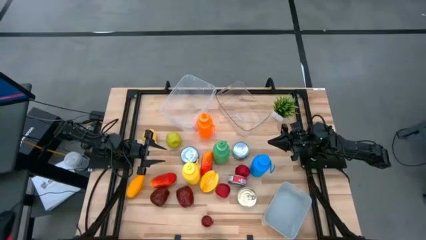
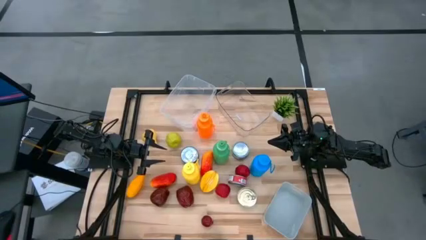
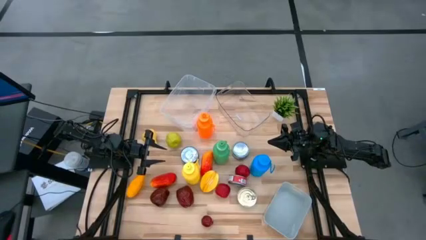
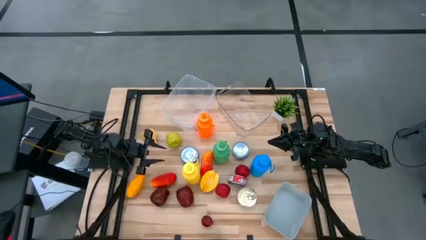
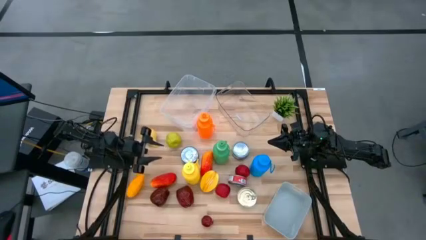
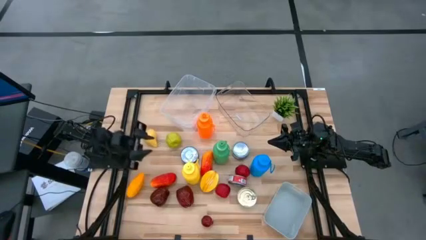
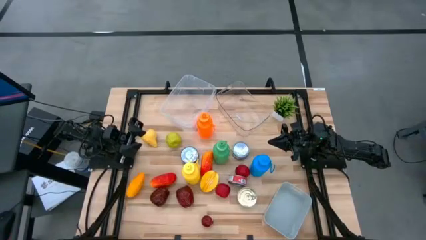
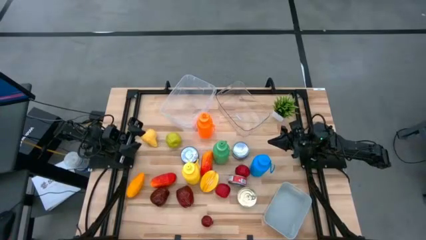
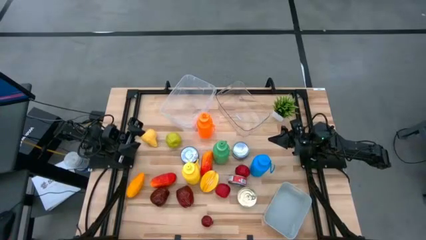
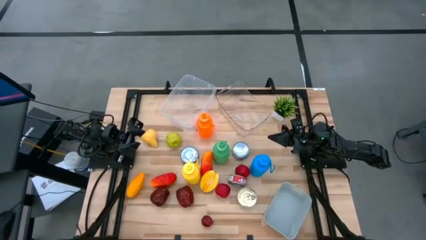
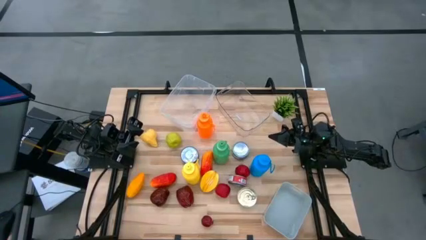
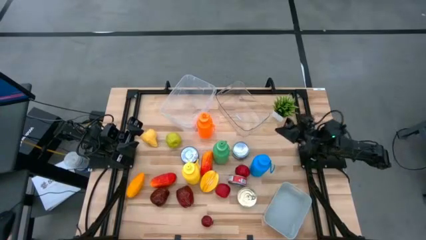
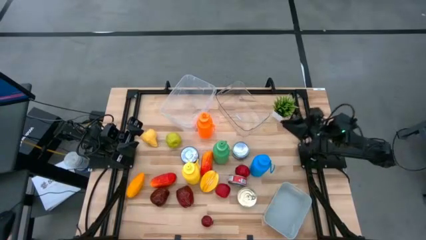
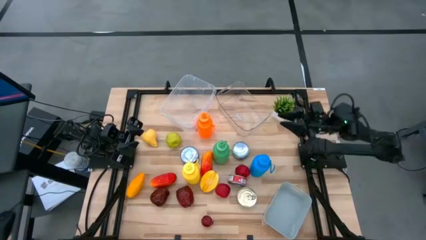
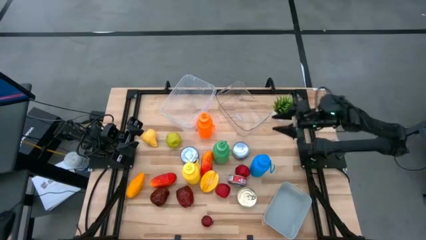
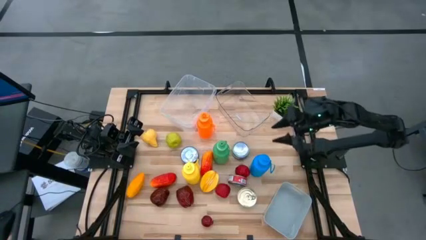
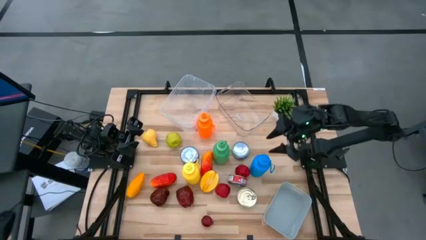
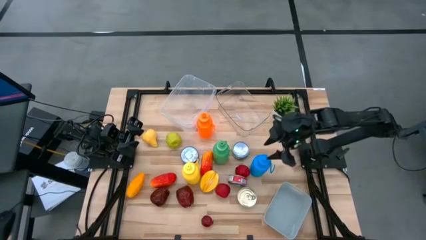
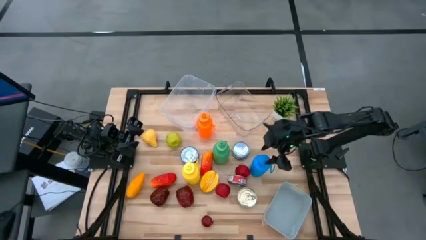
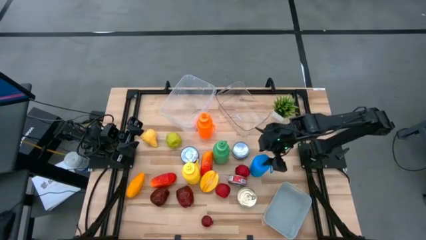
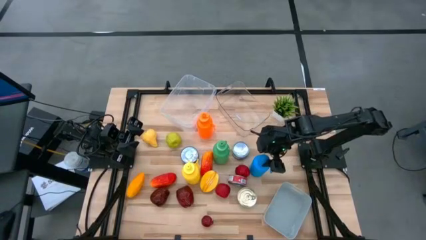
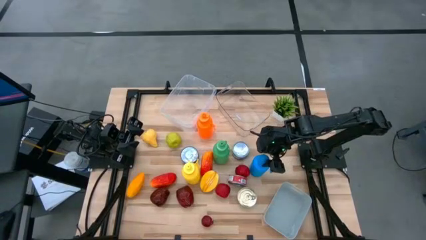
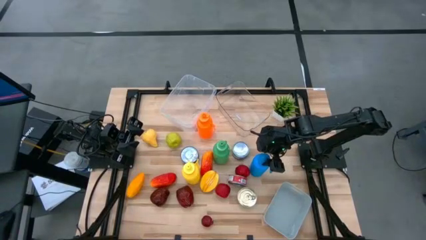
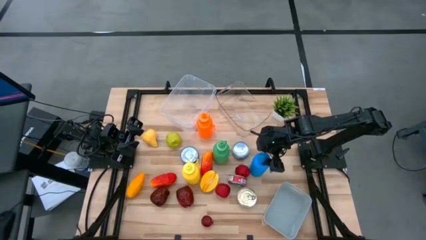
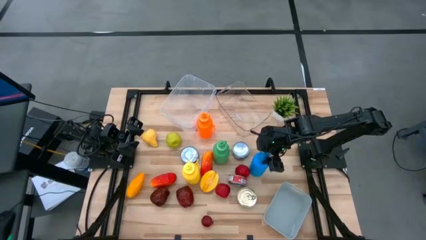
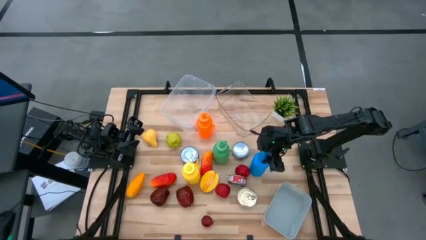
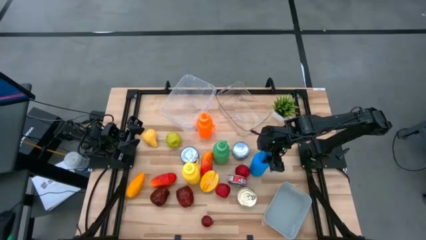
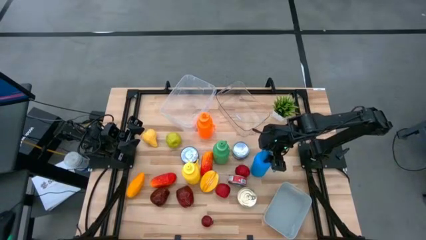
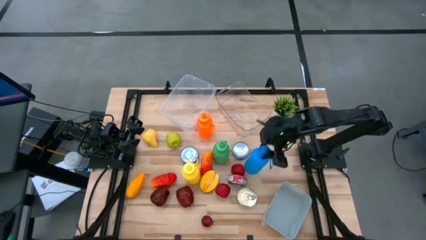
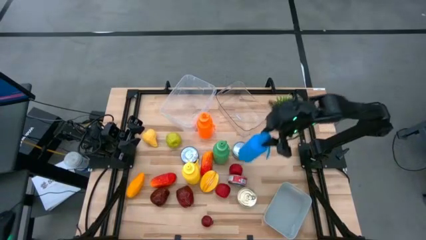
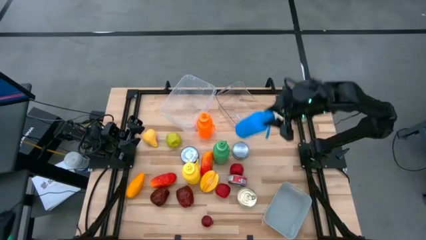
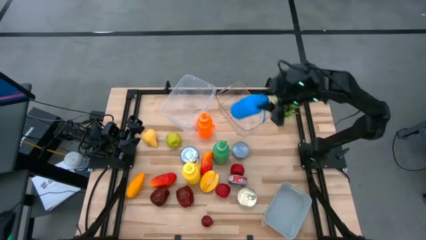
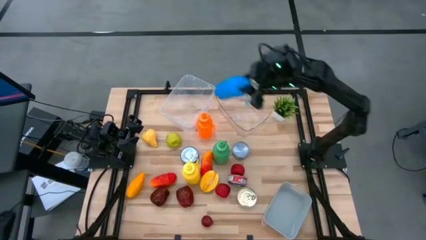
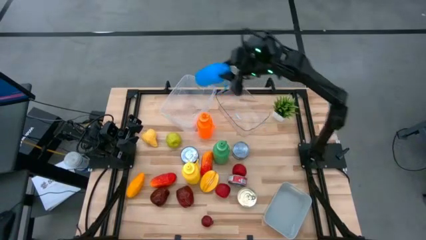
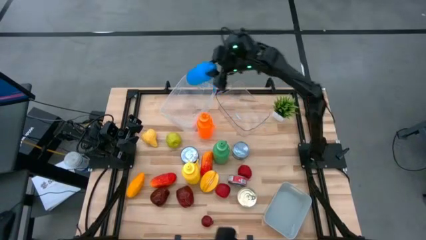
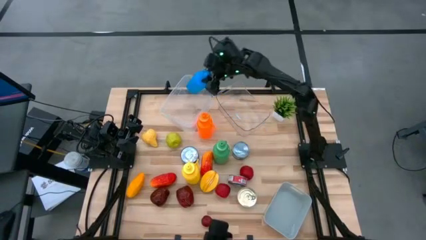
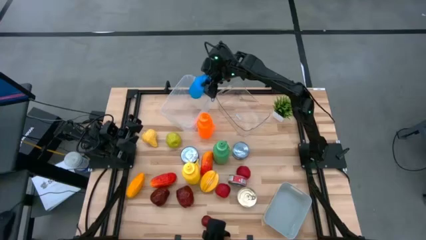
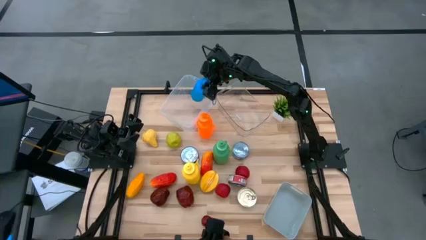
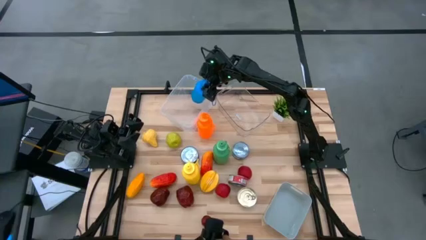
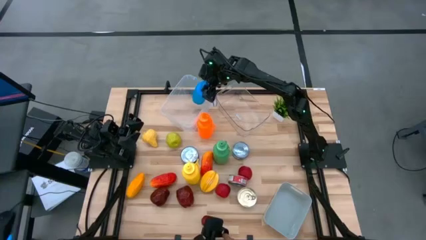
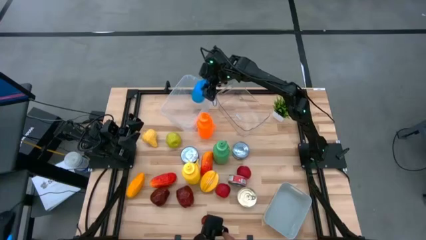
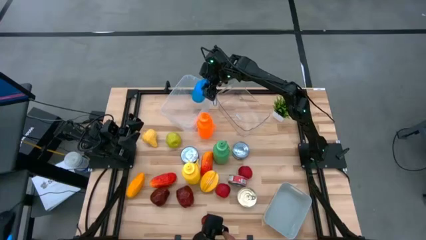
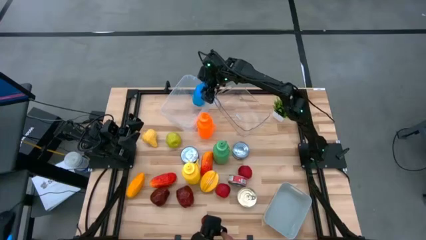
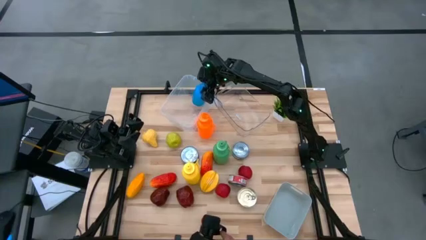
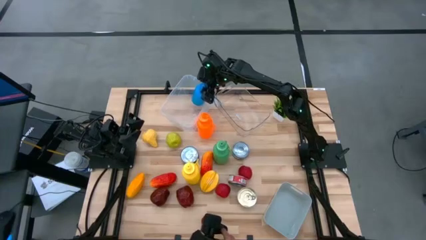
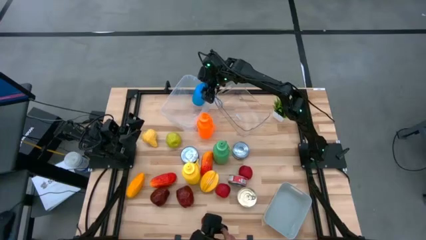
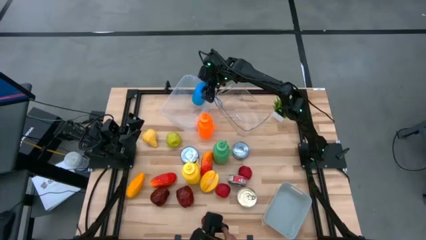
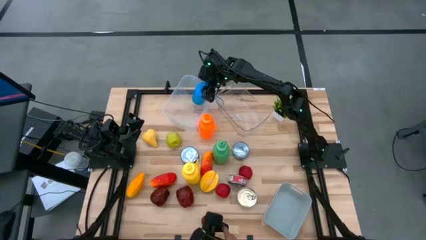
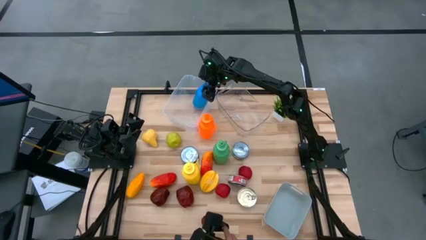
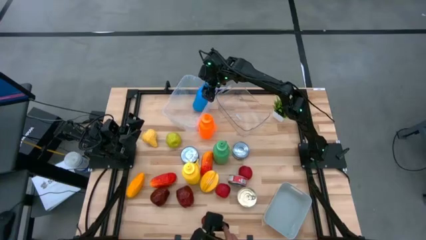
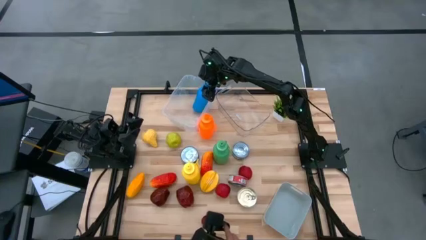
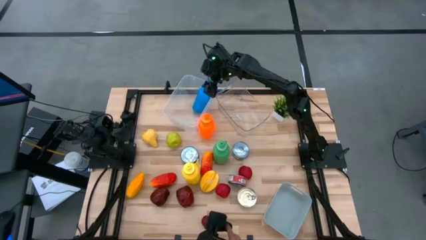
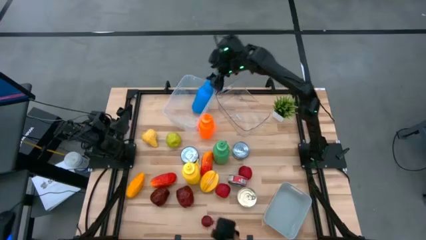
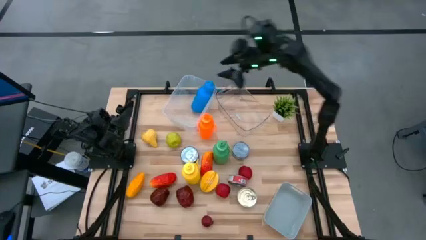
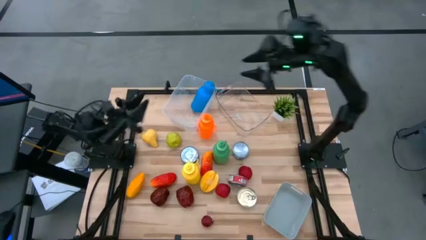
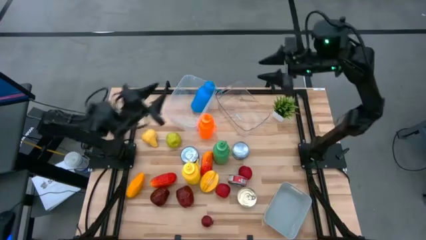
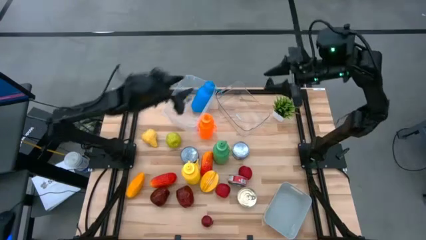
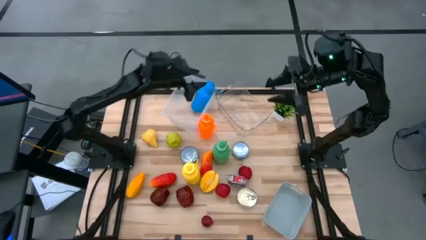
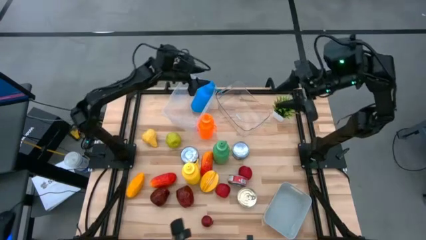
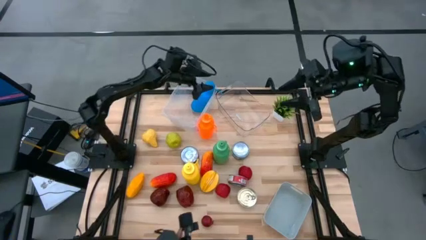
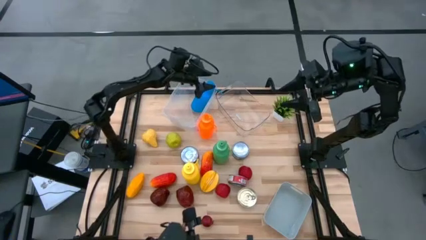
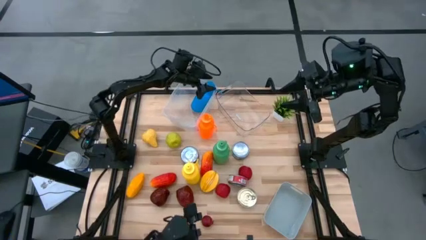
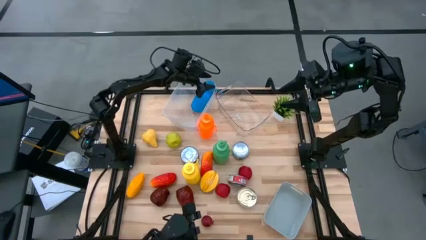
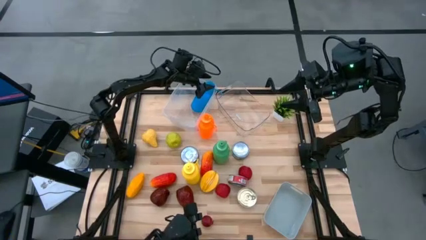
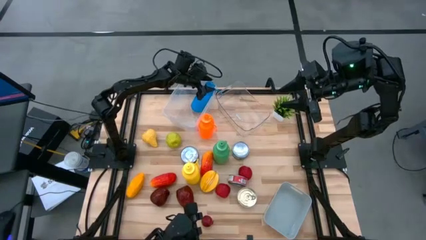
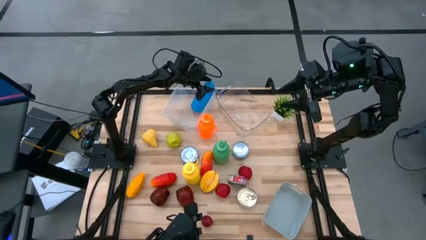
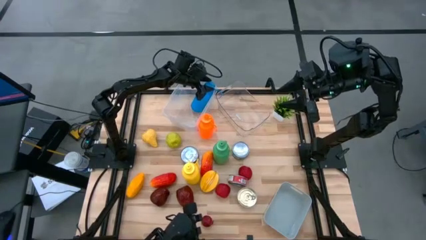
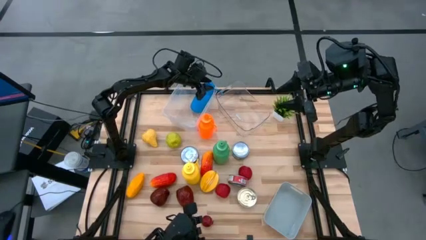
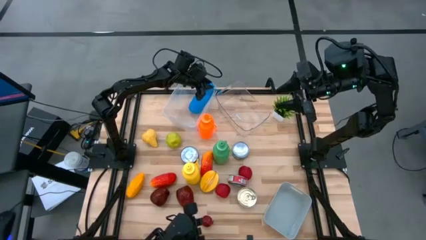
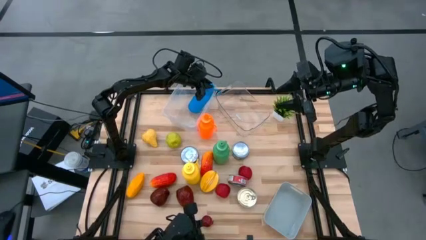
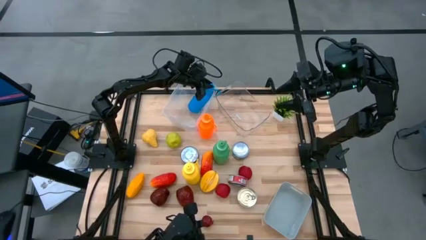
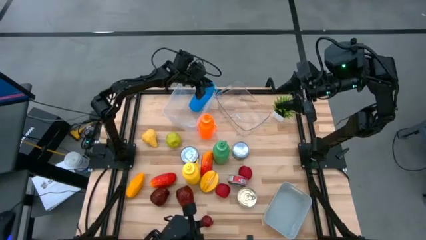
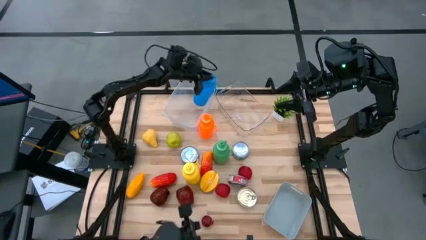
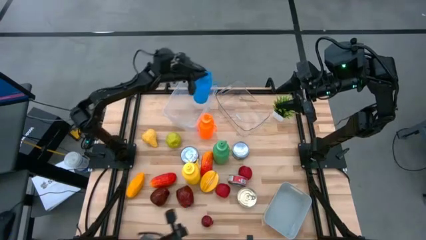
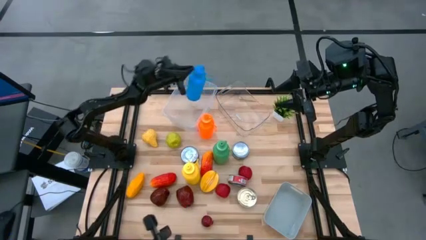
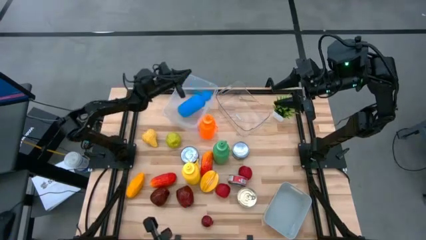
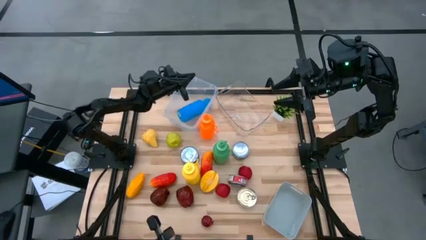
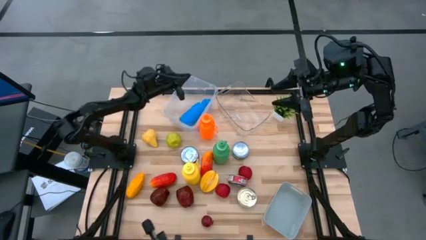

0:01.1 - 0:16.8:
Task: Pick & Place Food Item
Put the blue water bottle into the left transparent bin
